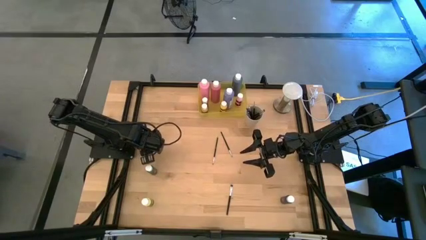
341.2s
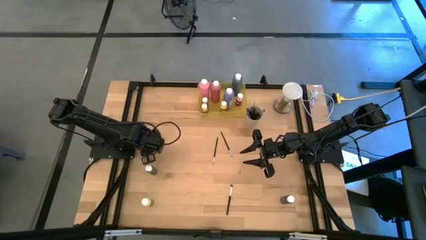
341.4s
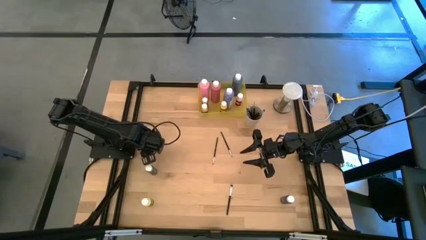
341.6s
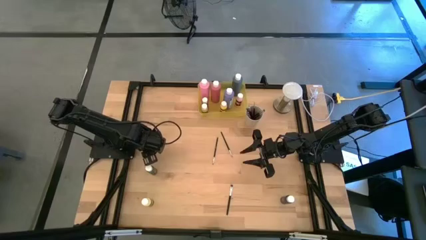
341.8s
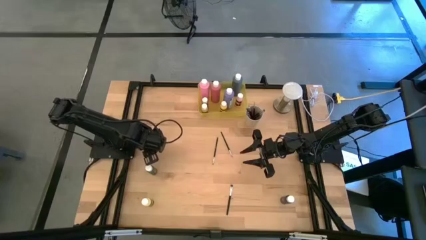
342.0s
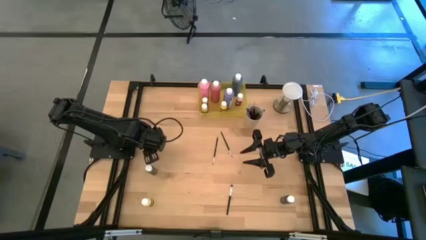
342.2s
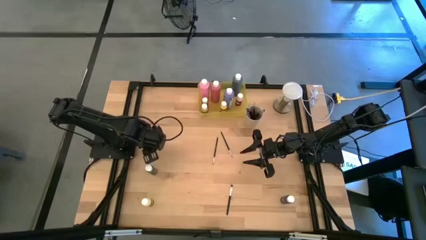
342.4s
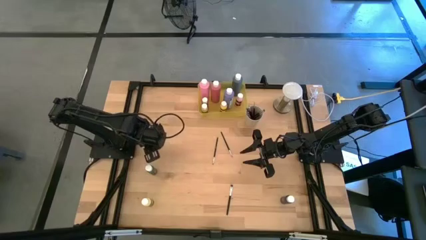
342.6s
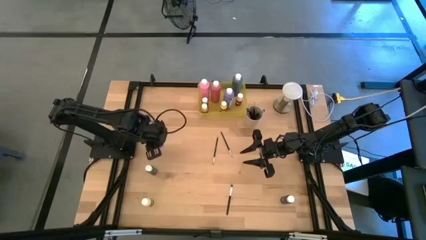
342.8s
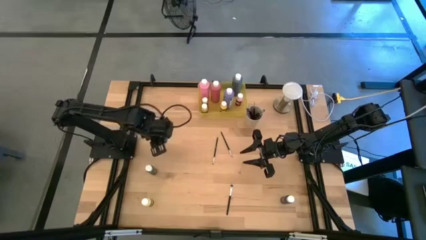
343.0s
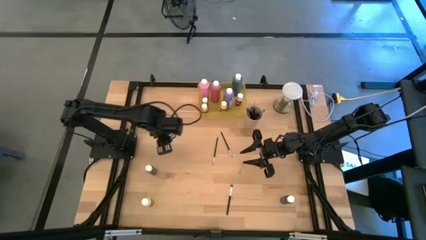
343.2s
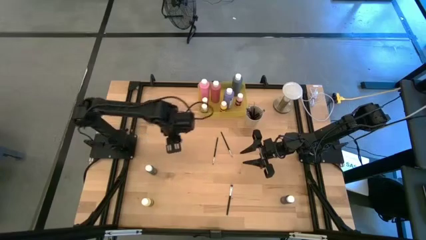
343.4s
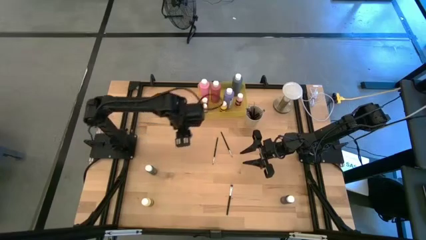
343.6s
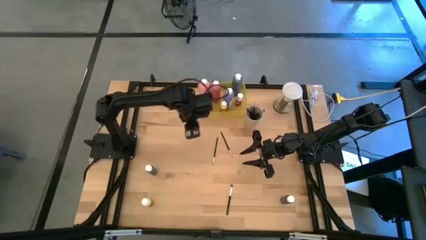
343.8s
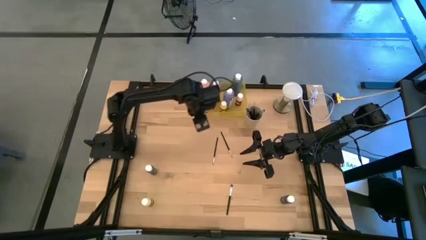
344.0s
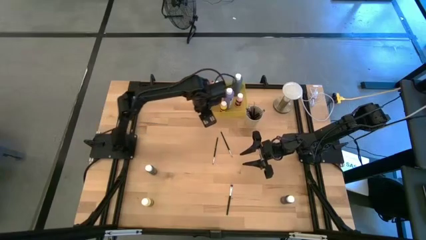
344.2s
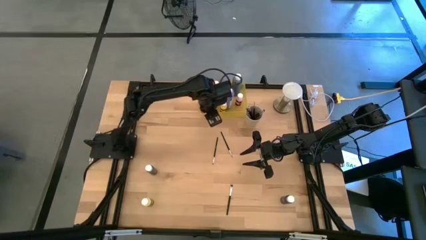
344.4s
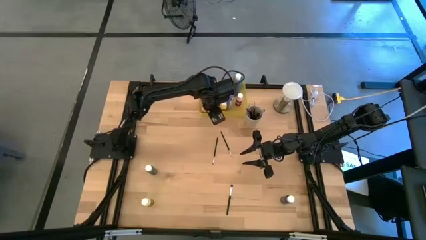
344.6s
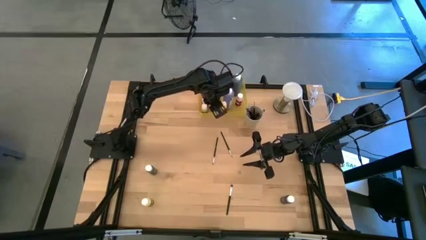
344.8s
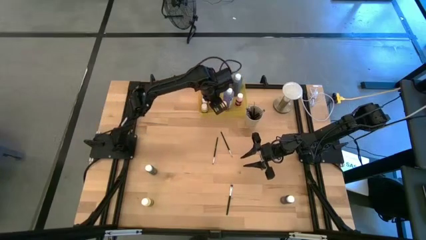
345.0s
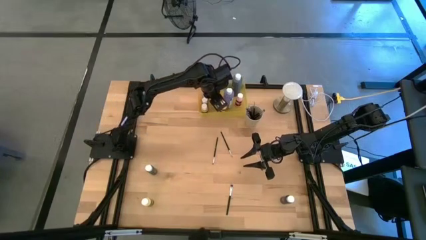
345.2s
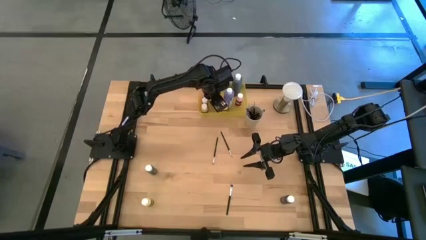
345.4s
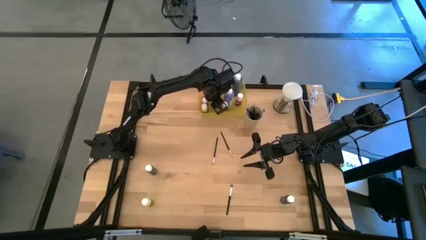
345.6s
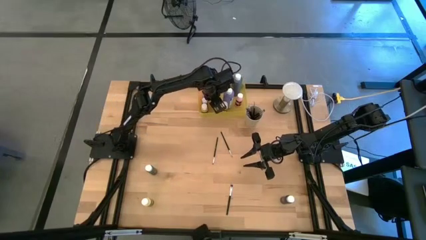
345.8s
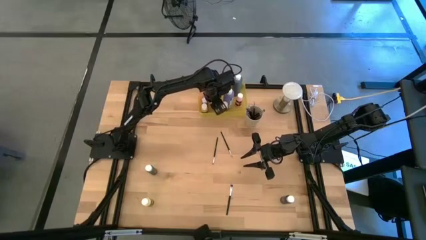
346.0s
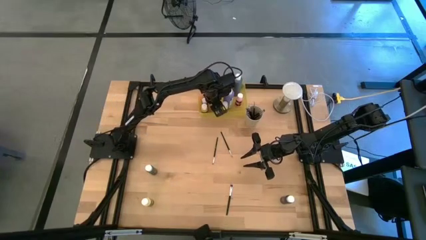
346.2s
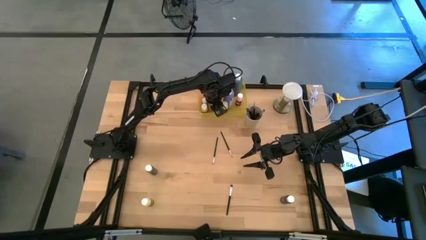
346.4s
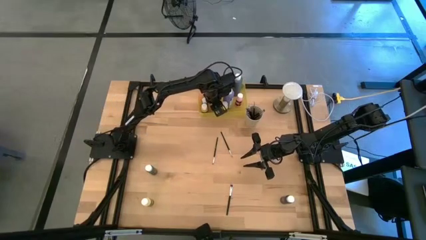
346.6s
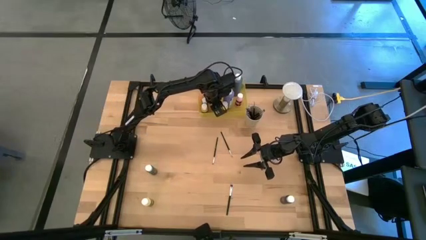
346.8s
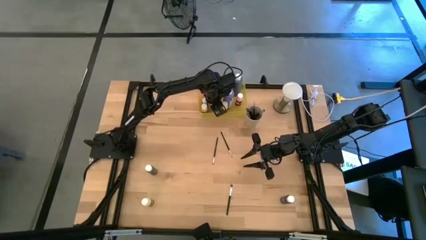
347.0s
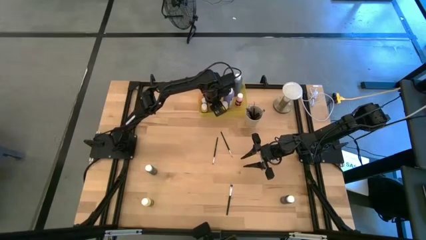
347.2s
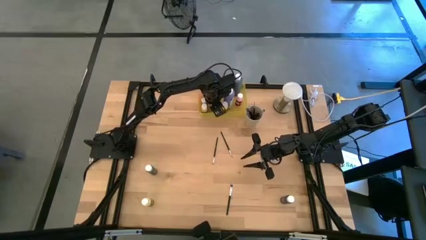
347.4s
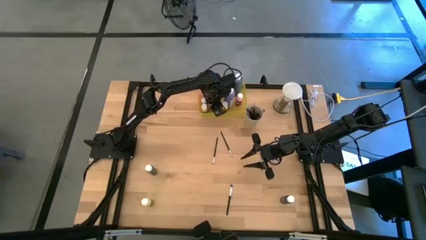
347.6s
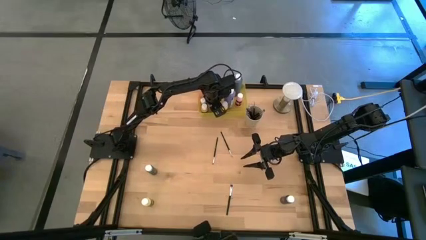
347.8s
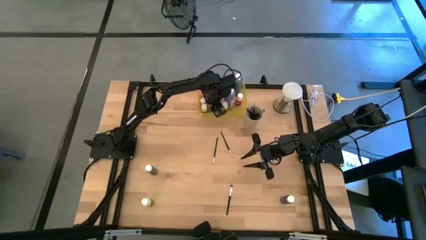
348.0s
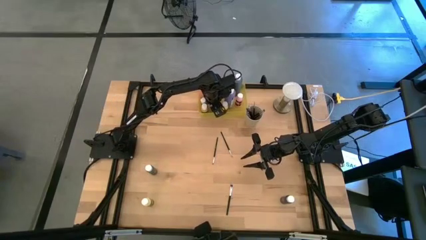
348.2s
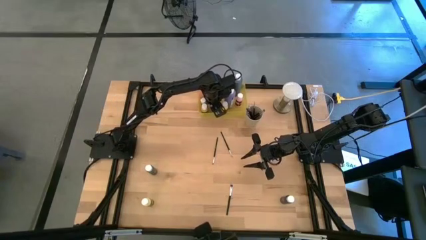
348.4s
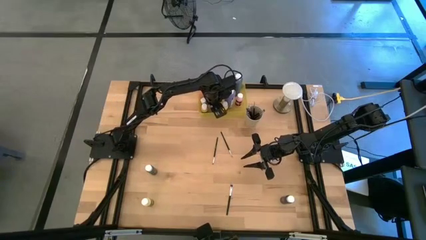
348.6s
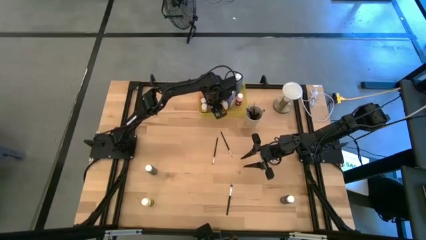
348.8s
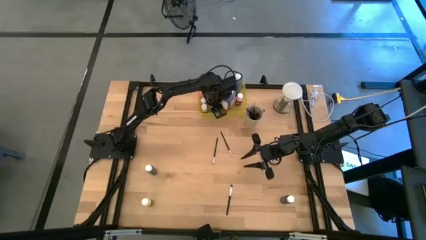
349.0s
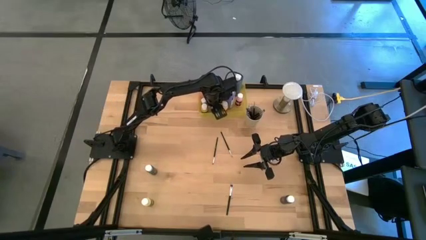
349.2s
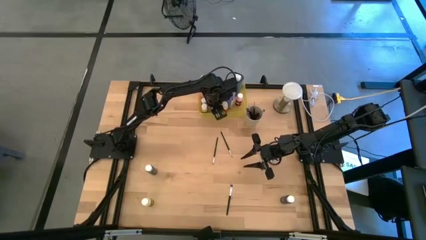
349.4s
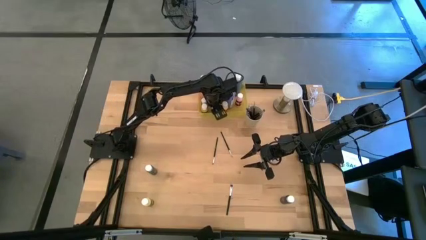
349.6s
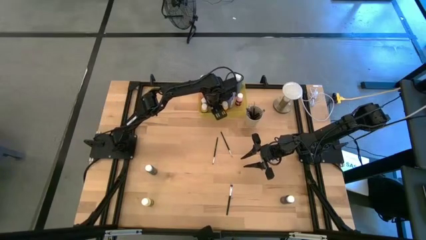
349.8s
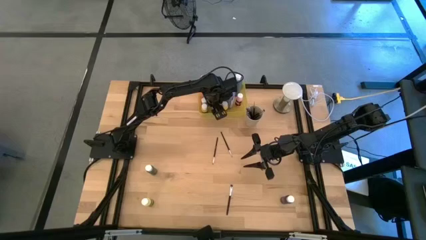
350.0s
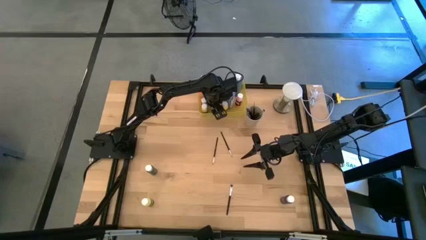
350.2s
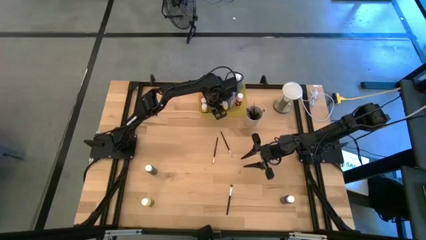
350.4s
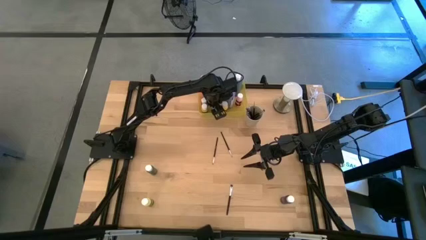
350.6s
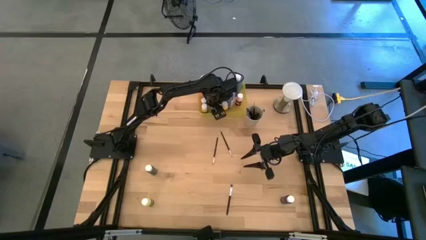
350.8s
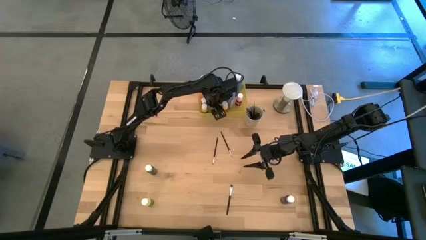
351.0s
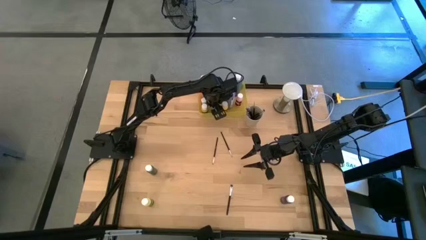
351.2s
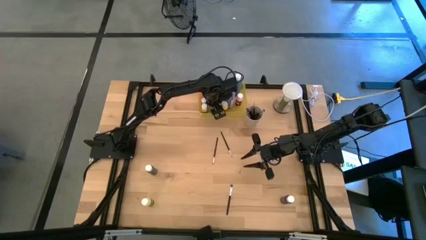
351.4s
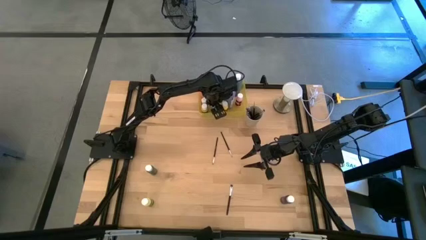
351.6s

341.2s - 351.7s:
Task: Pick & Place Paint Supplies
Put the small light blue paint bottle into the yellow bin

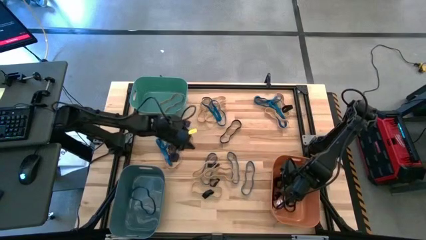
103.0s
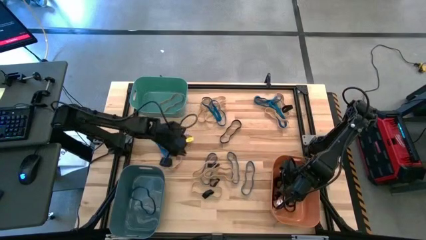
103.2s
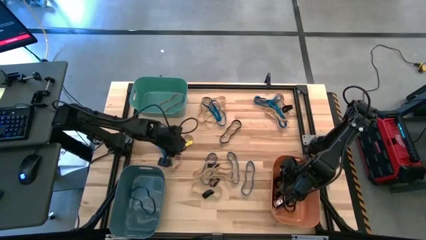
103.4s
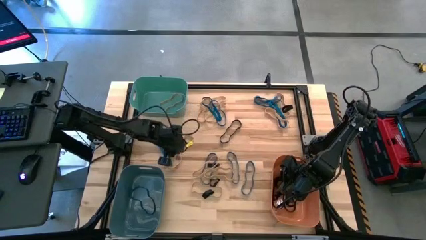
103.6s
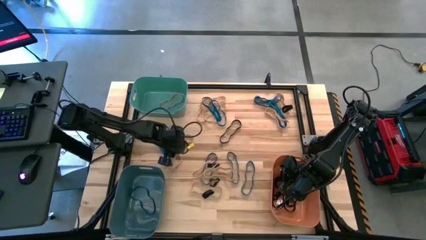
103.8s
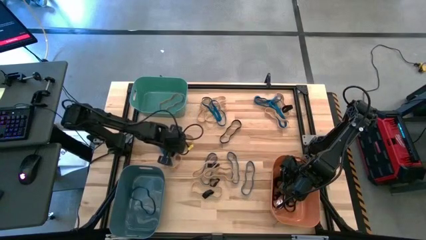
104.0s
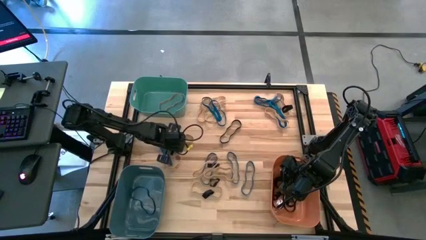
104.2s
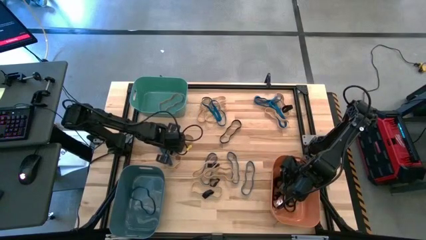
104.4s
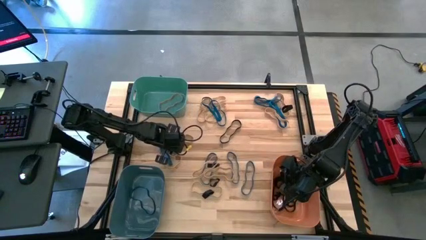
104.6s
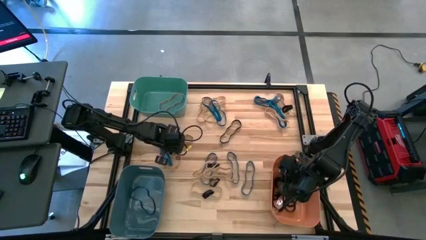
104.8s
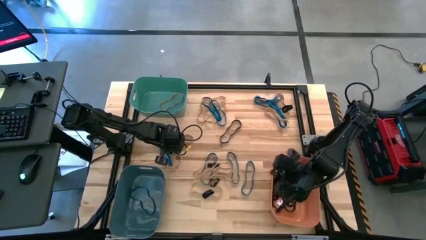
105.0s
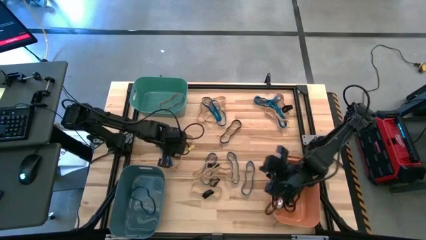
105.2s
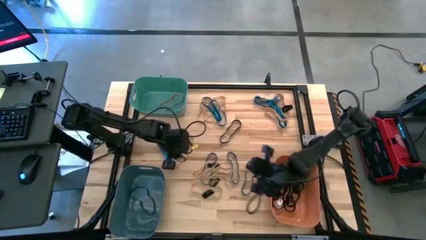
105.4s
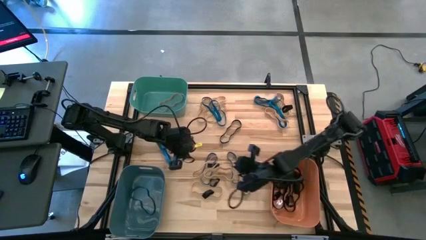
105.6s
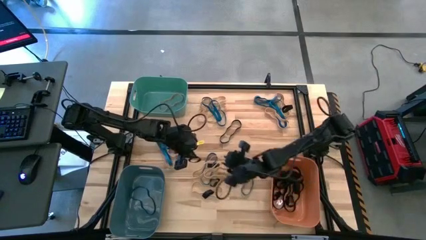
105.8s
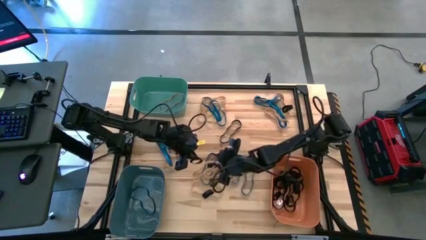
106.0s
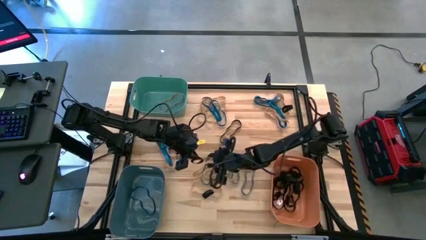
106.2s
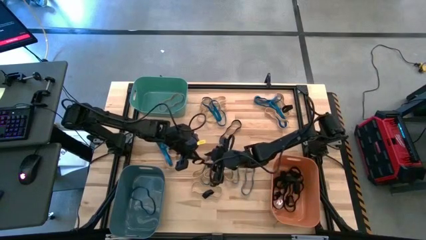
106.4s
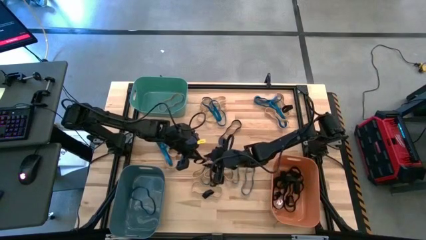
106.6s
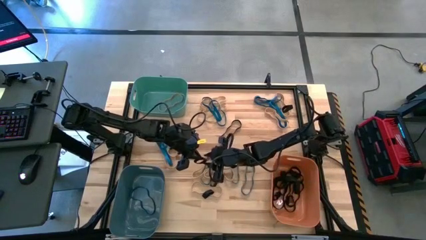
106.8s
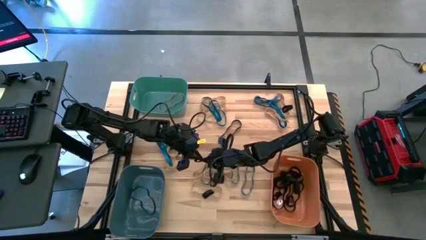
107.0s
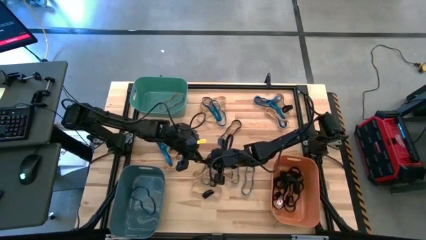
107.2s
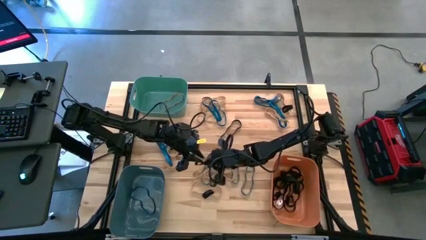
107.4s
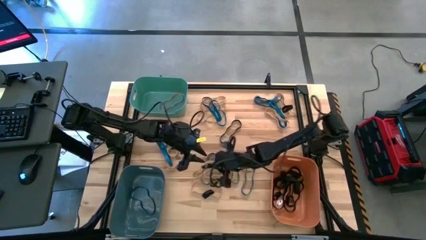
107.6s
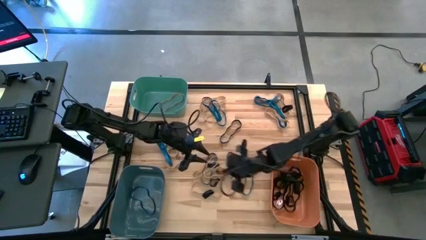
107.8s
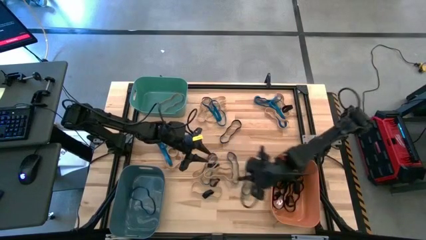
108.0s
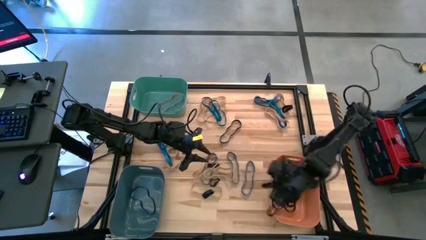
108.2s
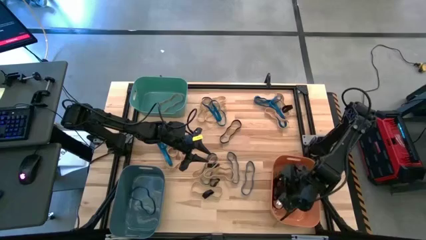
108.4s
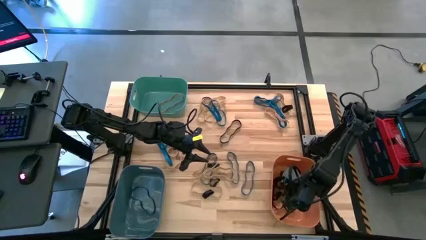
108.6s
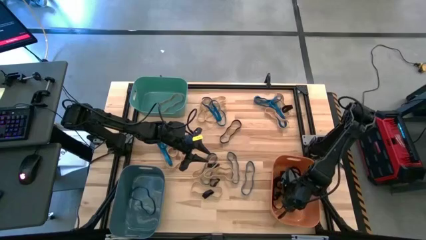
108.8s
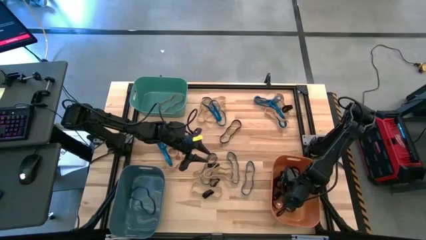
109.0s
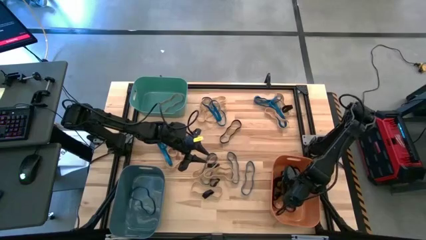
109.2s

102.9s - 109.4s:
Task: Sort rubber bands into baskets
Put the black rubber band into the orange bin
